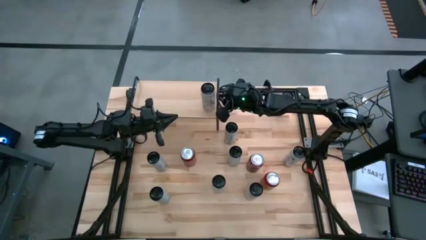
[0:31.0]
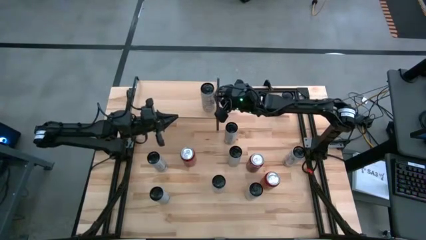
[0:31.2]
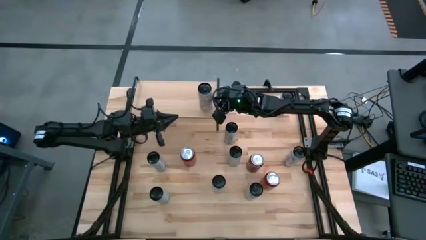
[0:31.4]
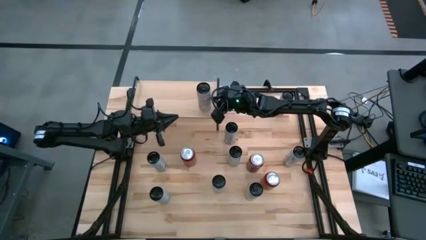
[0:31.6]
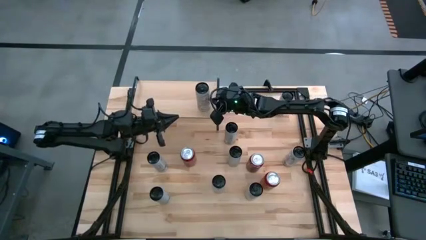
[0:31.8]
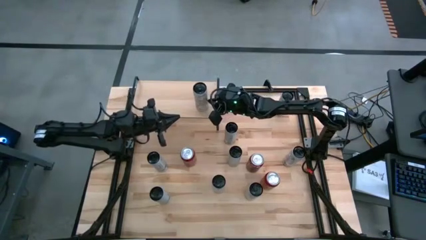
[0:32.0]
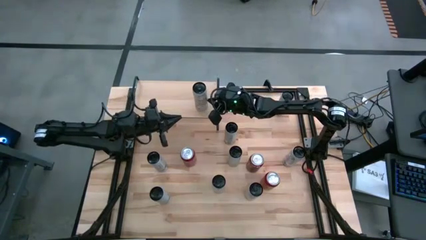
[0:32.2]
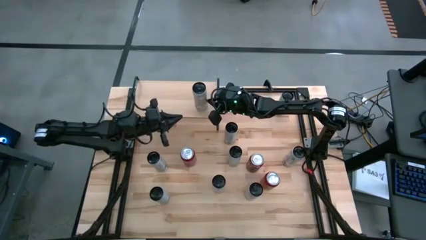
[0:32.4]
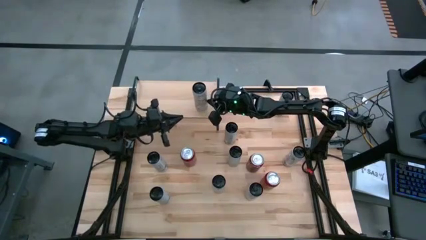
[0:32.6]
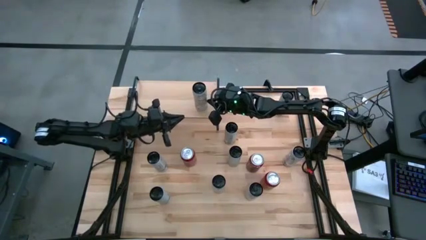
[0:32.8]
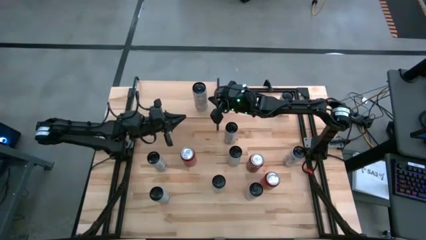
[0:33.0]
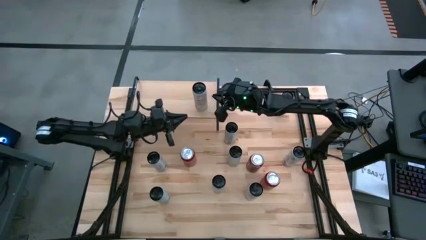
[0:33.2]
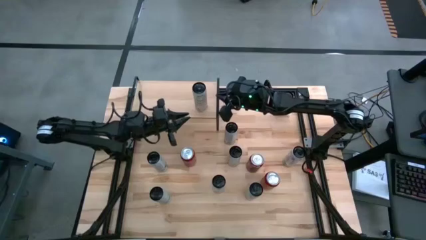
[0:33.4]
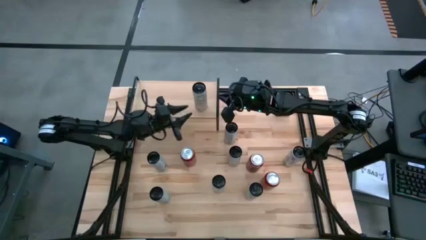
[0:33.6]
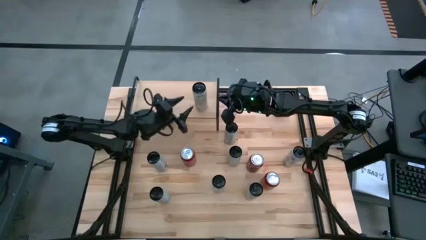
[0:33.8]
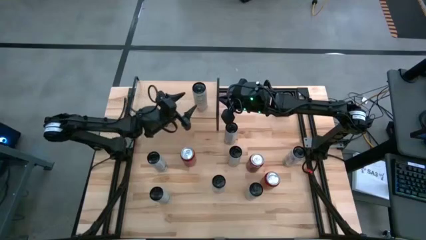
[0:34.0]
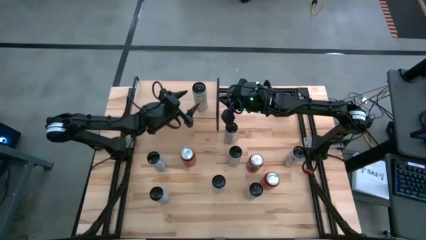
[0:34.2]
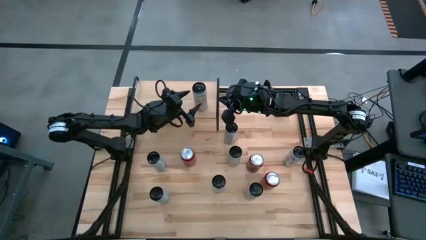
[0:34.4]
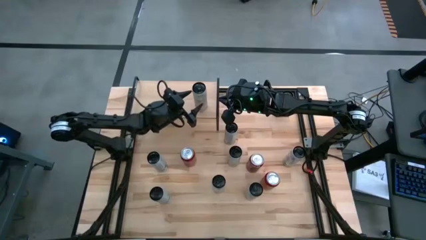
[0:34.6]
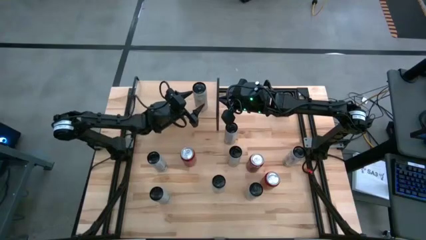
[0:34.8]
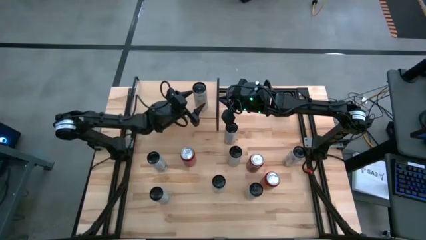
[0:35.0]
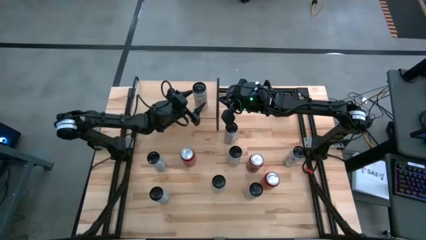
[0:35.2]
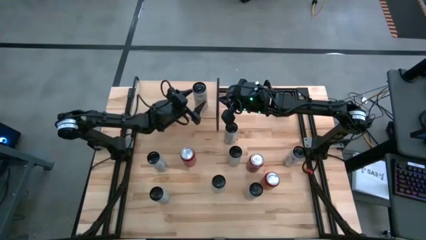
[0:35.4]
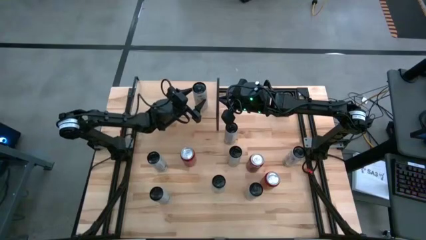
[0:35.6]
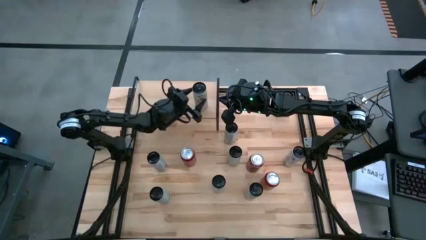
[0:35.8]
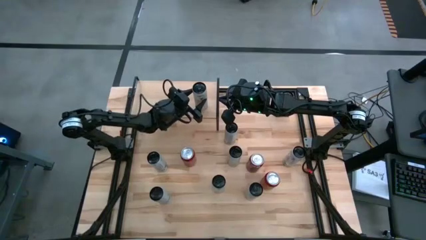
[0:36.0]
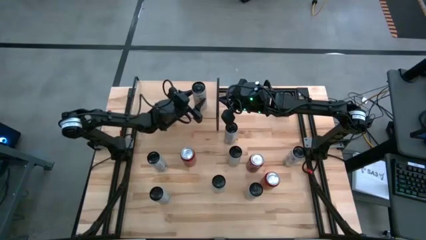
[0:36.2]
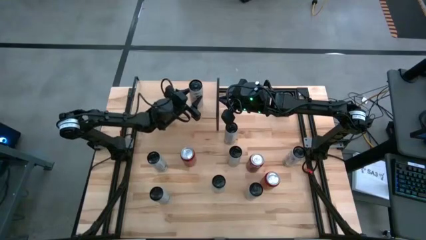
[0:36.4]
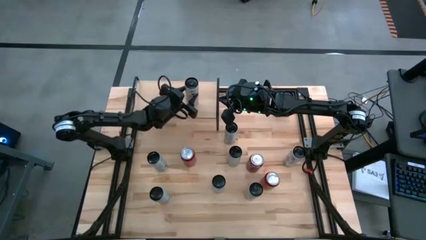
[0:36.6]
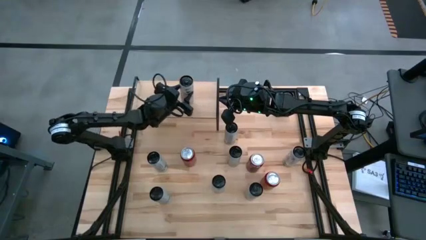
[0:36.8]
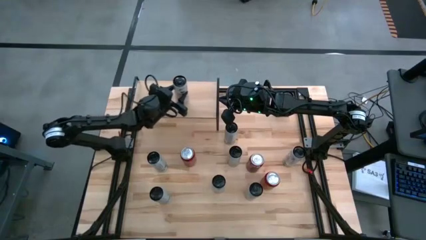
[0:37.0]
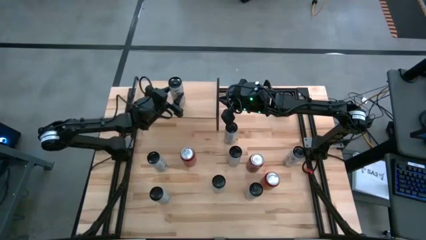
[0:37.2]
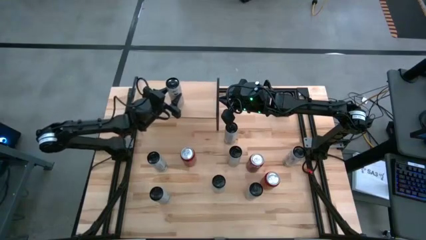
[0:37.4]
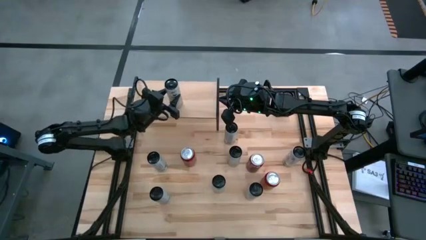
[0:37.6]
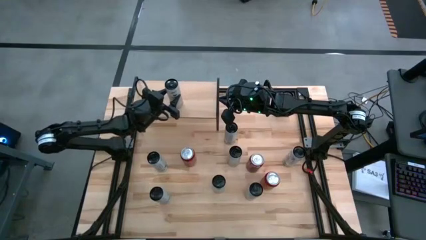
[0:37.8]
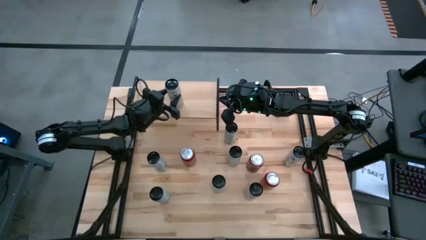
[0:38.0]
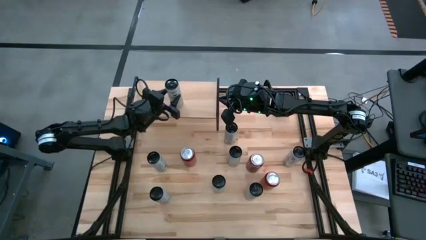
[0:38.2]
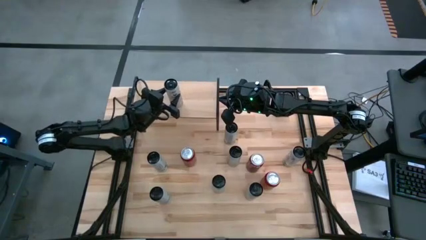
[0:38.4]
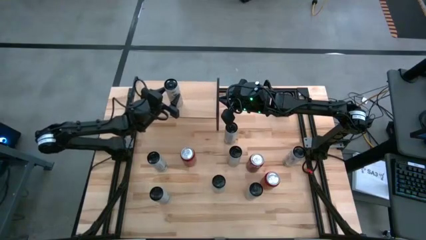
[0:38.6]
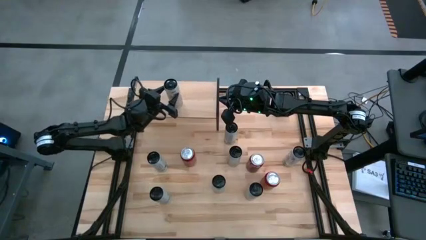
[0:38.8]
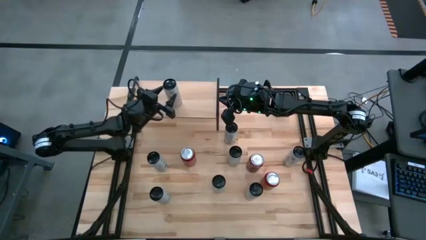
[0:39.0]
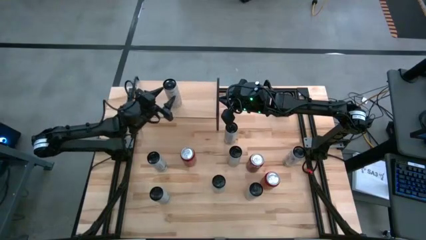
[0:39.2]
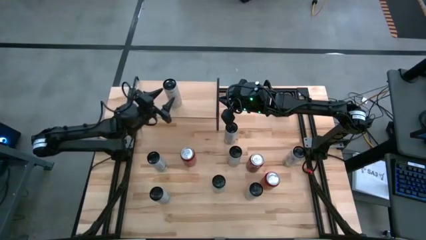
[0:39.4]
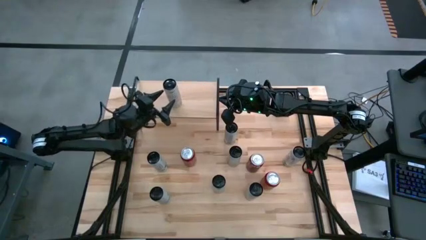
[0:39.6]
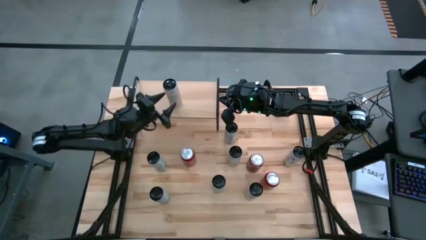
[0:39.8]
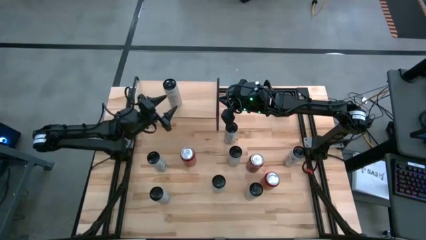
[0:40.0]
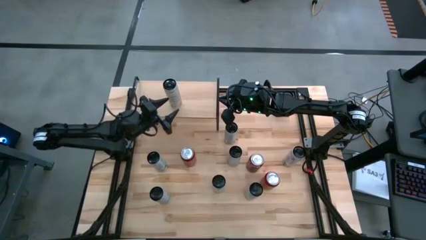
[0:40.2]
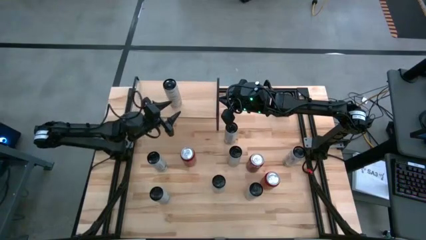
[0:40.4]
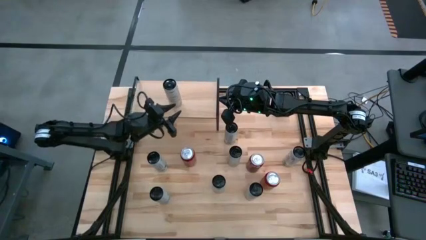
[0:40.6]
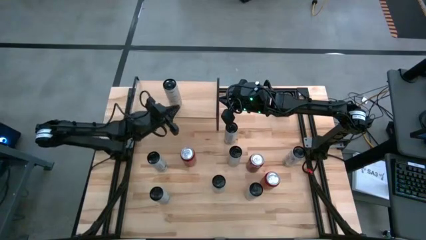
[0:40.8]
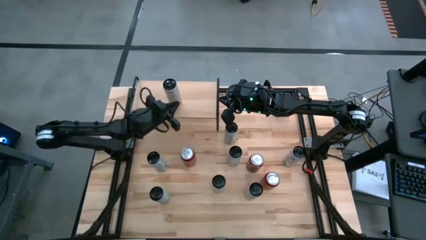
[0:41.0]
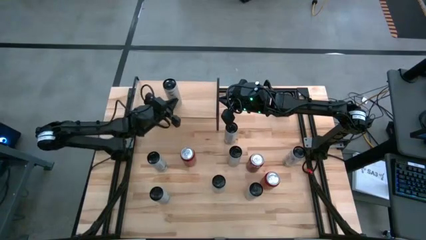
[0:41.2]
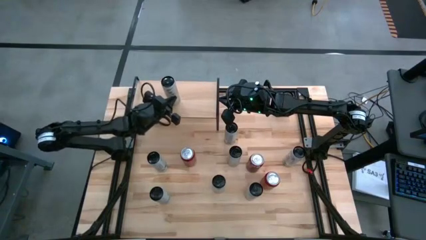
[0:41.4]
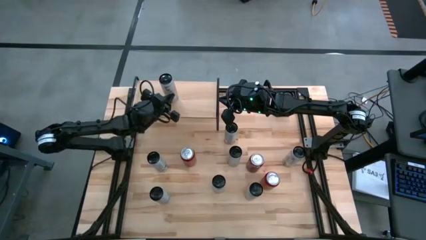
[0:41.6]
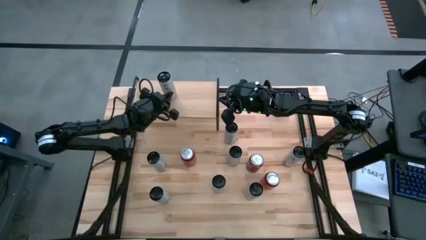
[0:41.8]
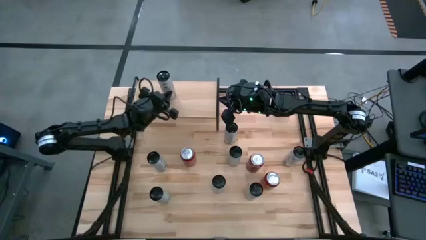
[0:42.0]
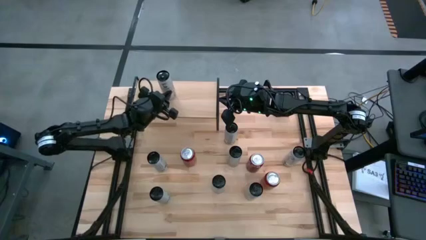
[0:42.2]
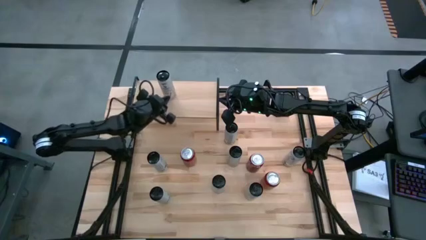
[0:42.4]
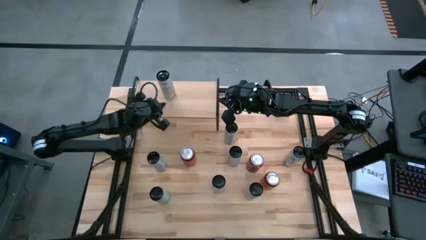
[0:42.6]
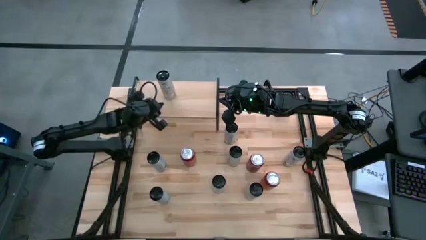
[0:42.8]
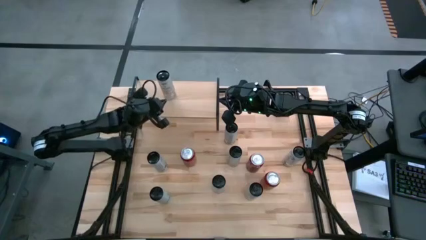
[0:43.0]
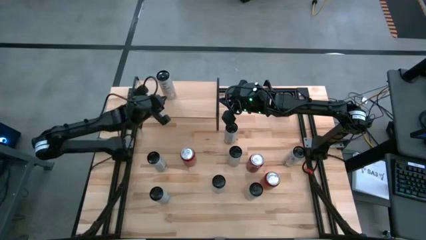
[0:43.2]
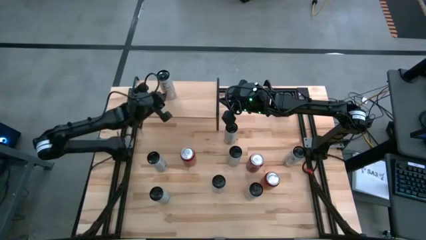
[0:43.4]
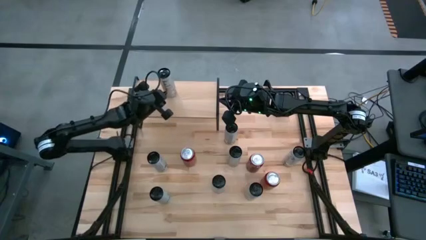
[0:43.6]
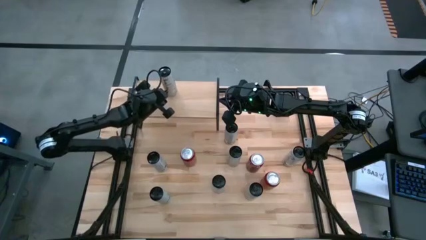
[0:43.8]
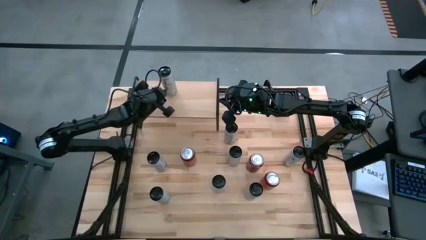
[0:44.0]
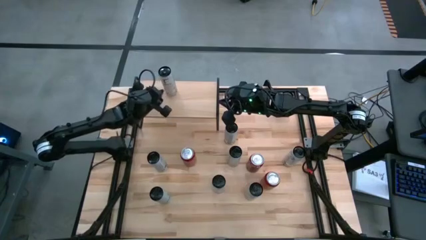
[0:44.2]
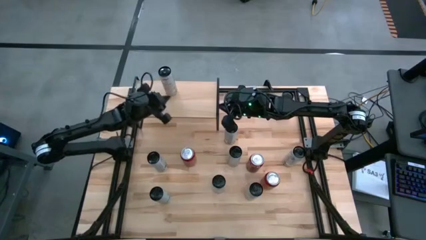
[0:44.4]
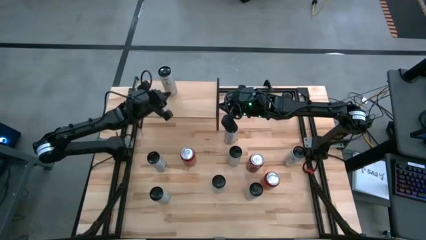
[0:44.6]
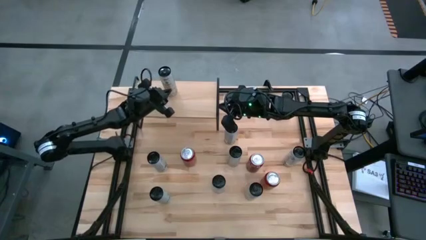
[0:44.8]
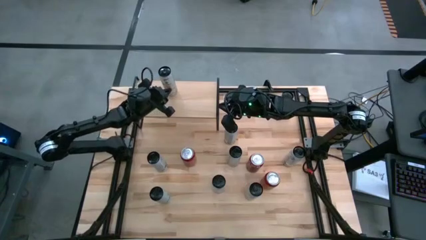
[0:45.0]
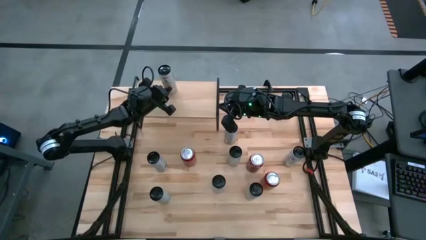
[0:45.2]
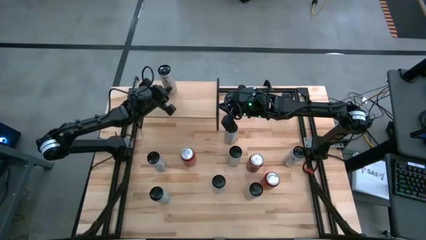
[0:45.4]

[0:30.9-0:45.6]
Task: Place canned beverage on shelf
Put the top right white yellow soda can on the shelf
